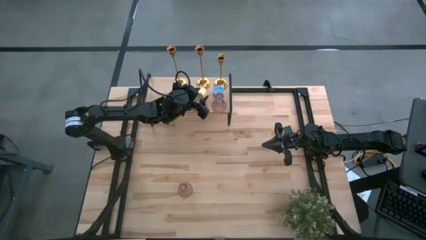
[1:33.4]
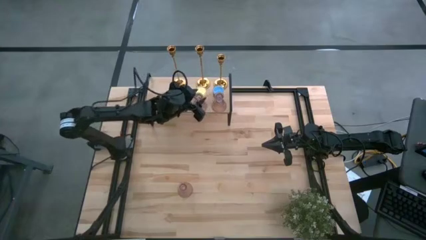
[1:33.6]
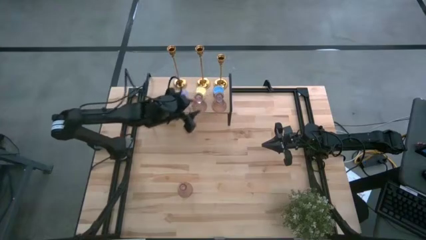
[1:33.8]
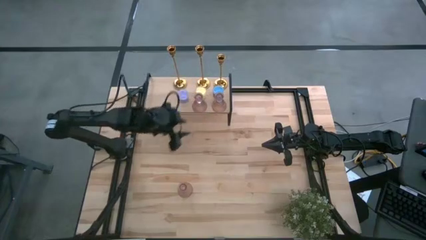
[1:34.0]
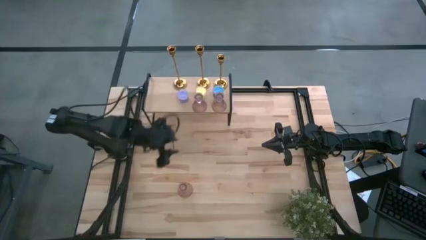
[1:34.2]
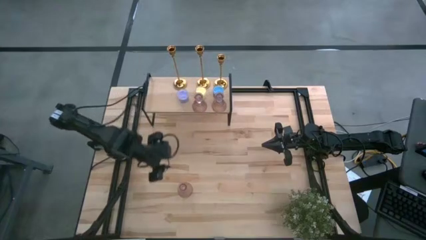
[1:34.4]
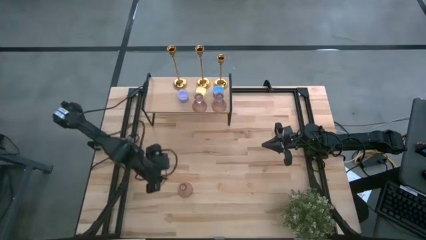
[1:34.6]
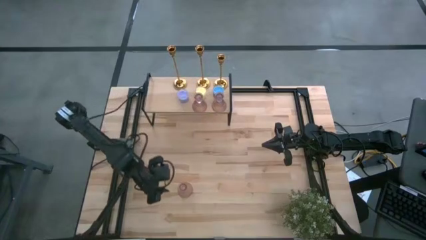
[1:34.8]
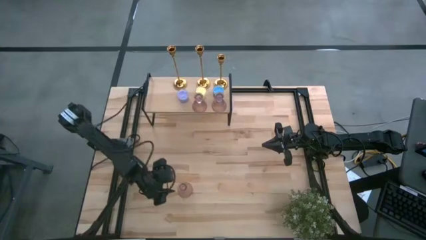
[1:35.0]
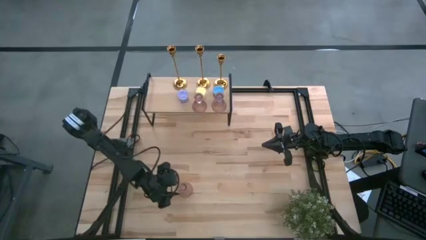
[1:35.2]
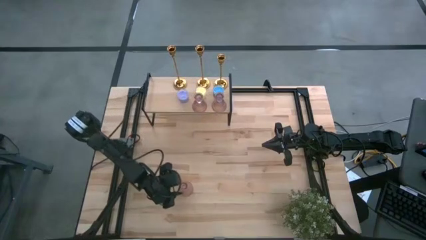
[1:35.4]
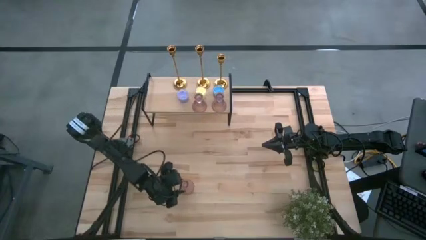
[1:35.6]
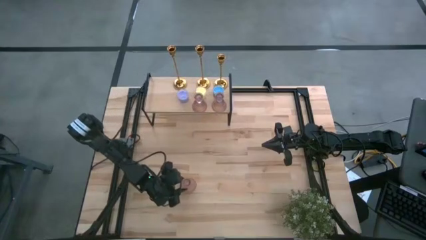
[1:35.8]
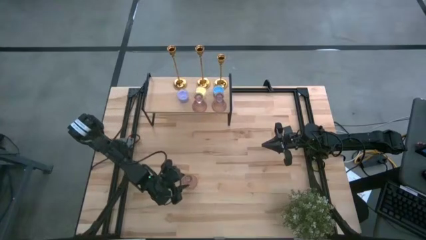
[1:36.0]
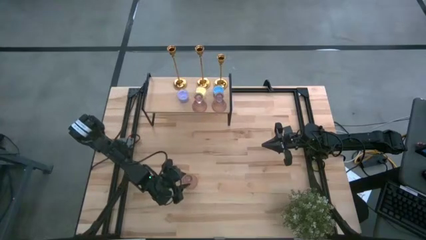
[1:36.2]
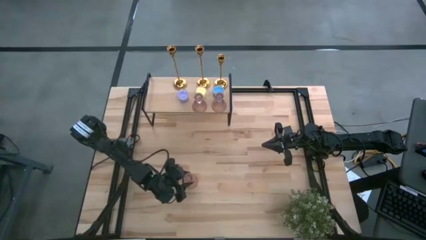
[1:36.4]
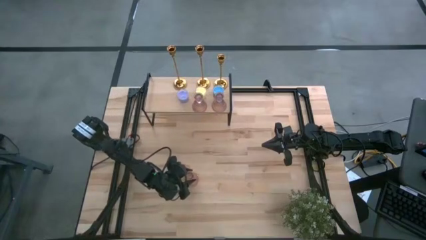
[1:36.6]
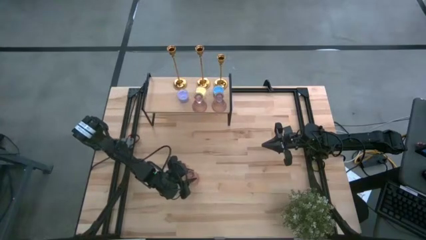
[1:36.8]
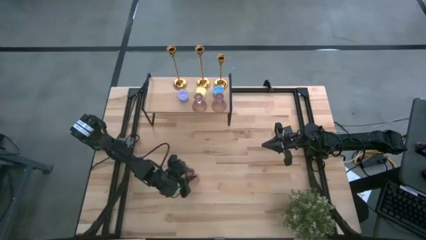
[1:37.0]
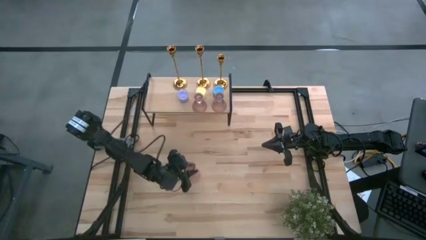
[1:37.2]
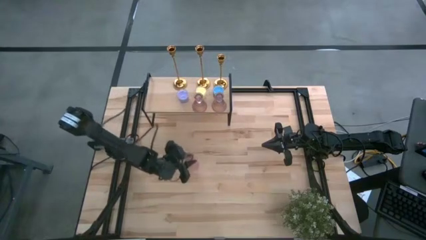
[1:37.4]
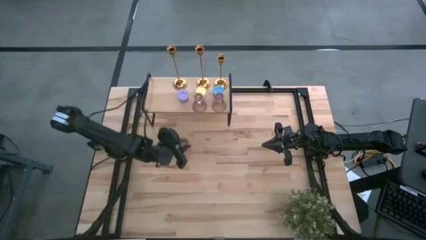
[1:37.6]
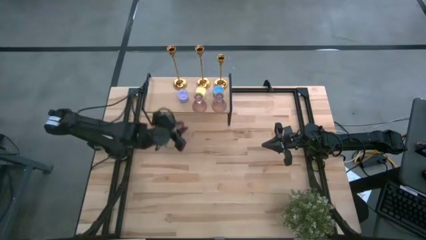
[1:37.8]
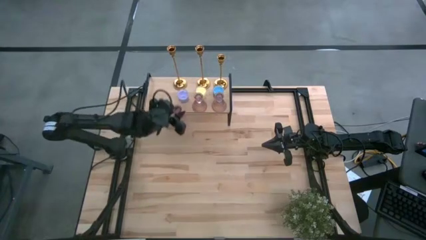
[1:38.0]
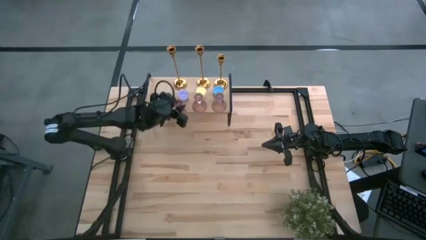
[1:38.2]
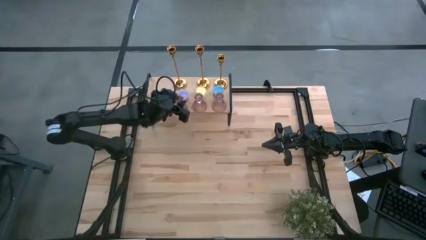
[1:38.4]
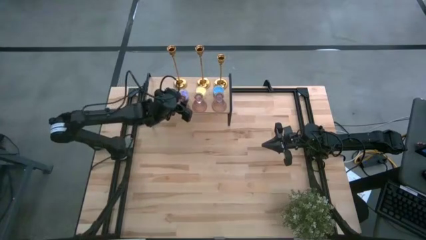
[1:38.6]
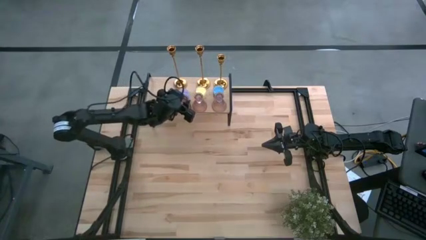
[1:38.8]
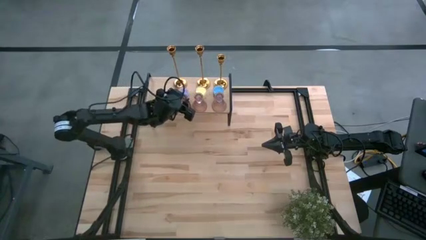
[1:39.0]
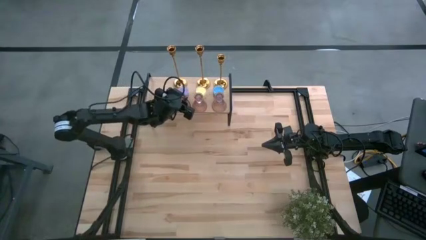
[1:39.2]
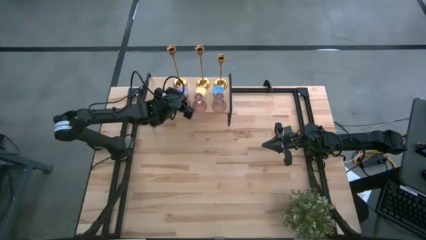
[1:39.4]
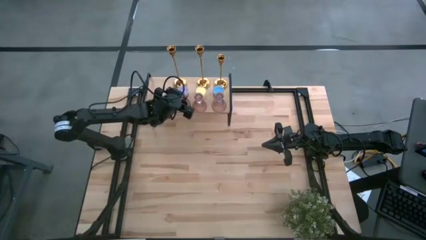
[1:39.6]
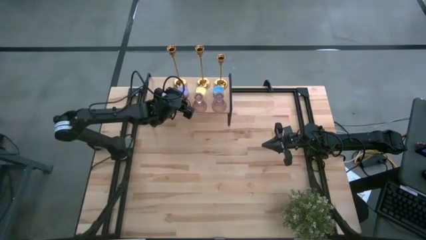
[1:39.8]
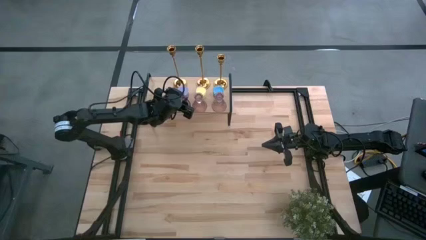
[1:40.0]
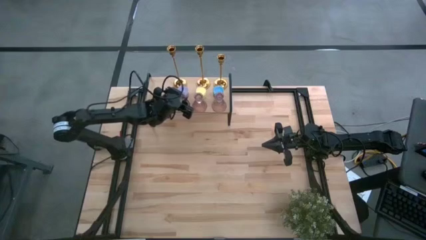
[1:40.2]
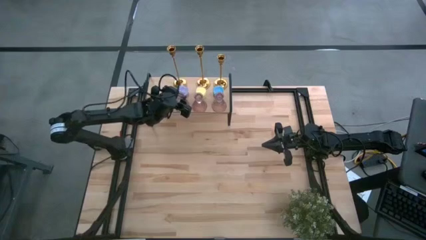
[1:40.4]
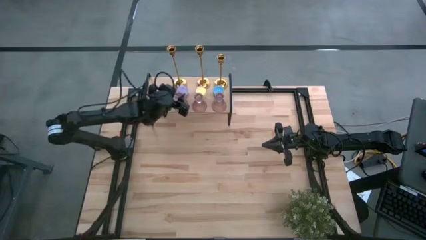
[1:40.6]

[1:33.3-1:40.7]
Task: Pick & Place candle stick holders
Put the pink candle holder on the shelf aligned with the pink candle holders

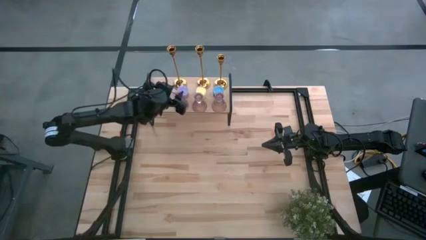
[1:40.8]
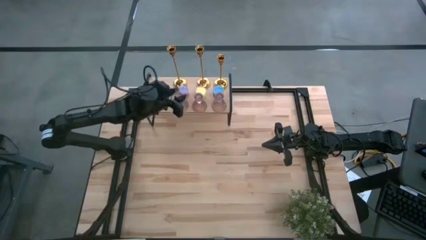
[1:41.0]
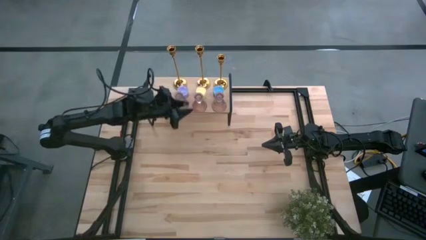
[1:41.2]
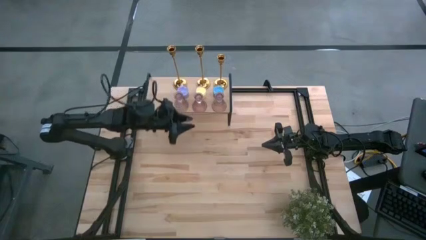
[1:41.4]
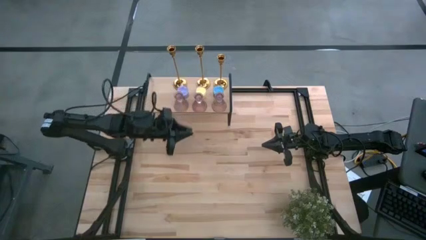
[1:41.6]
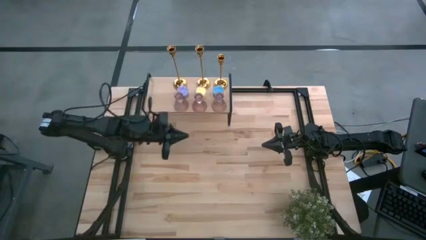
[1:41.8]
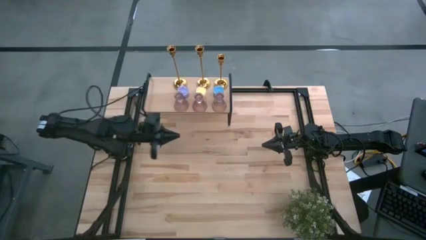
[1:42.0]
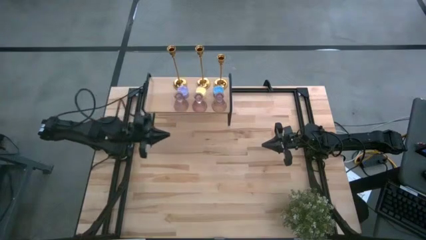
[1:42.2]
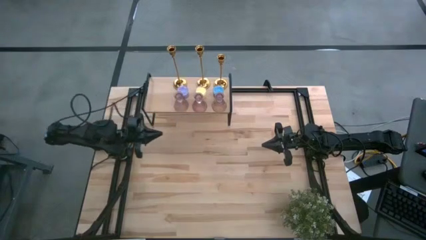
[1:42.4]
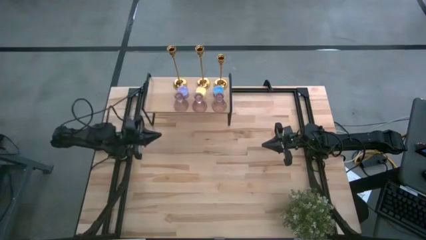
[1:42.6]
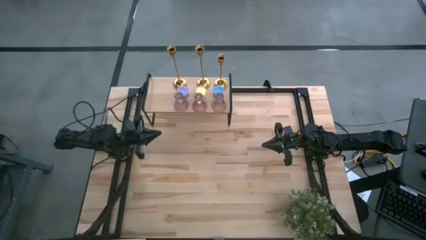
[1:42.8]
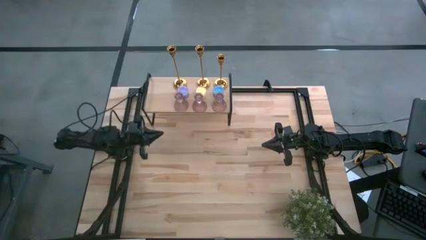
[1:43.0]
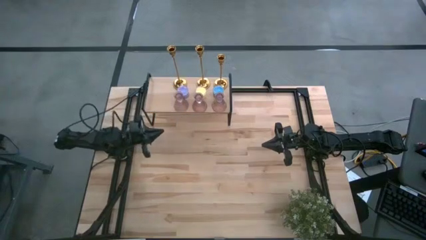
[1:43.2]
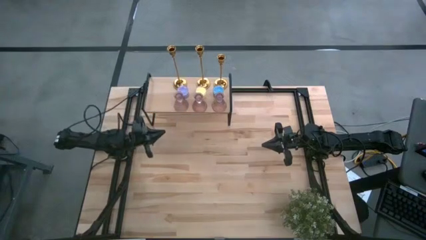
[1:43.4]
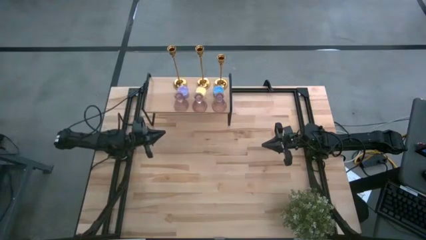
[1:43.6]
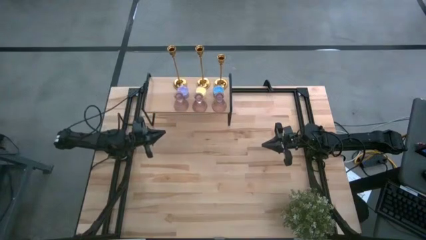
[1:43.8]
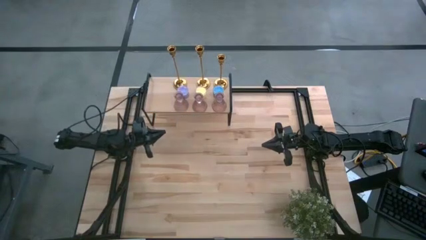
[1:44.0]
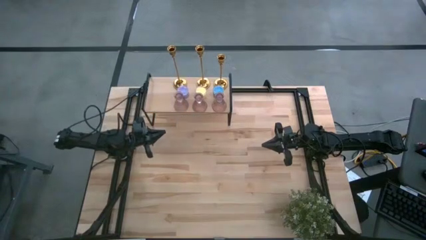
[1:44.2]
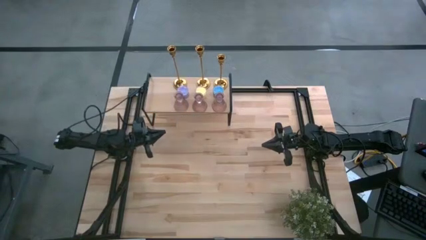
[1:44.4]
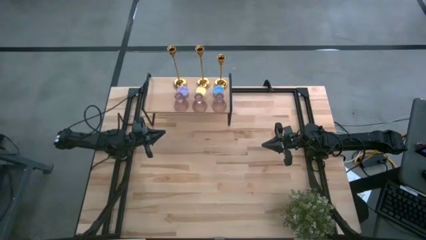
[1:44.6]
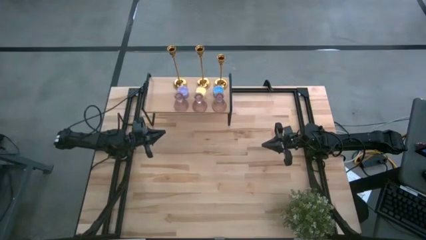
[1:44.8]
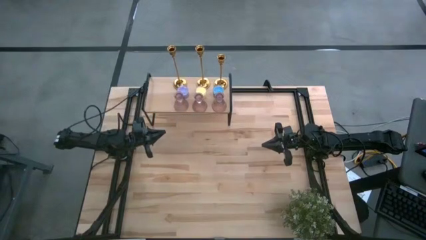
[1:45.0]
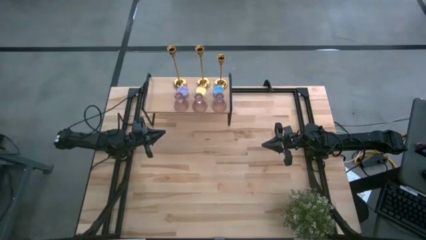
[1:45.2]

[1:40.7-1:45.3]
Return to Home Position

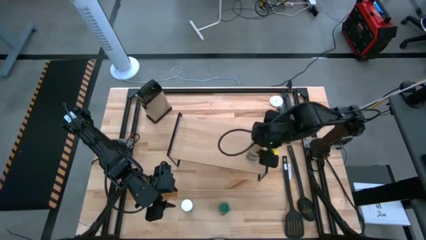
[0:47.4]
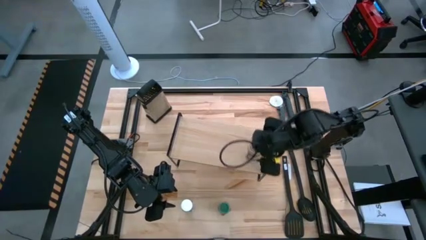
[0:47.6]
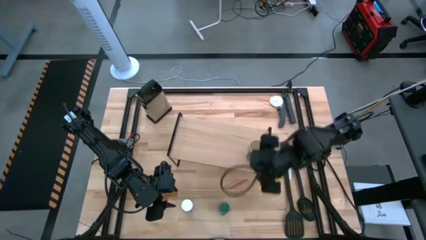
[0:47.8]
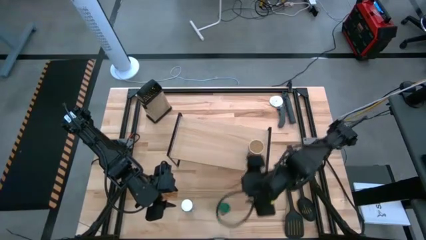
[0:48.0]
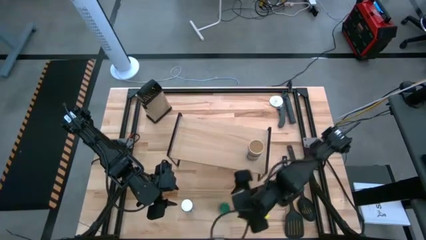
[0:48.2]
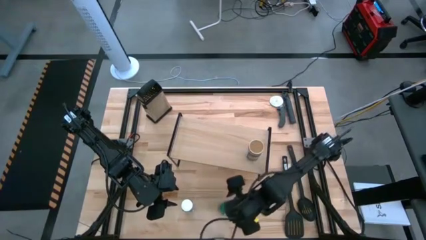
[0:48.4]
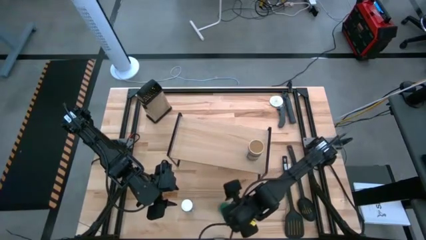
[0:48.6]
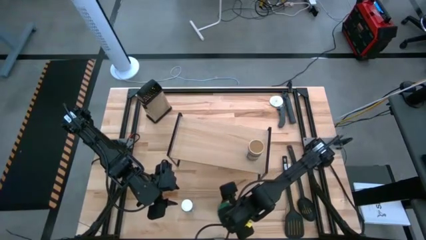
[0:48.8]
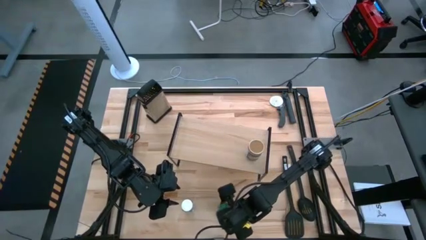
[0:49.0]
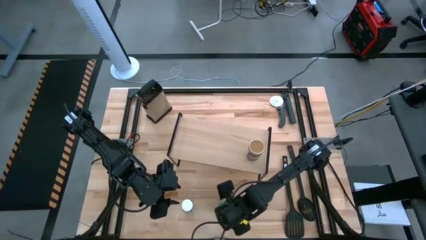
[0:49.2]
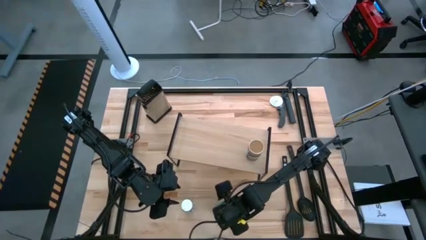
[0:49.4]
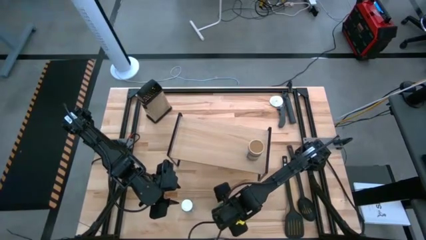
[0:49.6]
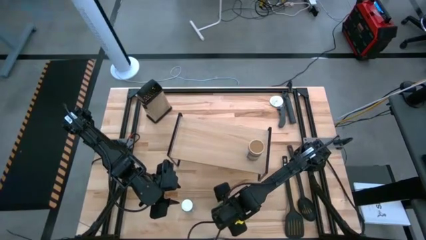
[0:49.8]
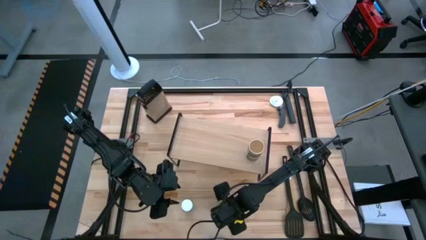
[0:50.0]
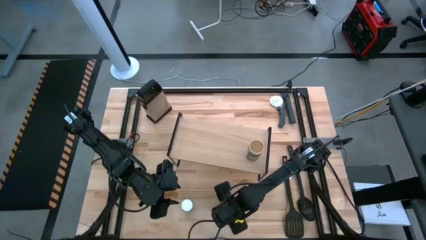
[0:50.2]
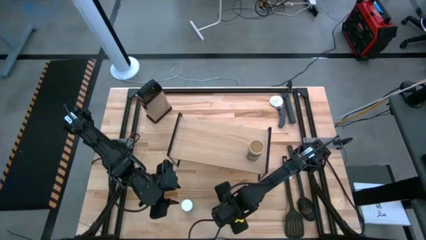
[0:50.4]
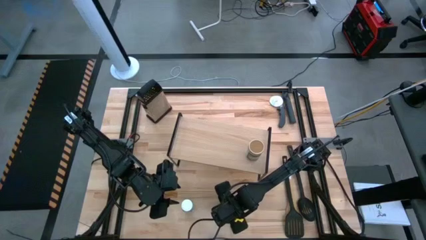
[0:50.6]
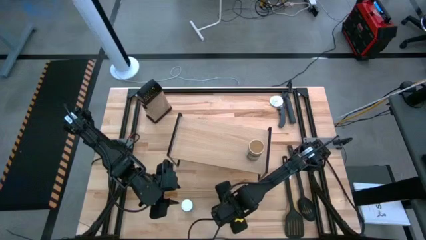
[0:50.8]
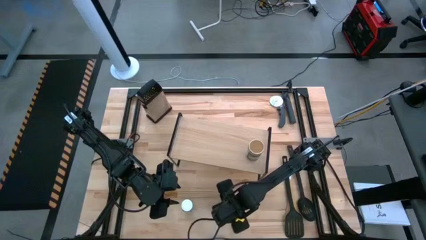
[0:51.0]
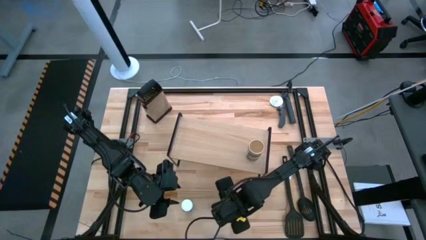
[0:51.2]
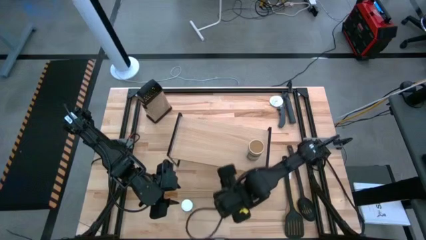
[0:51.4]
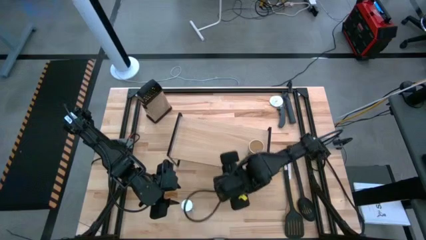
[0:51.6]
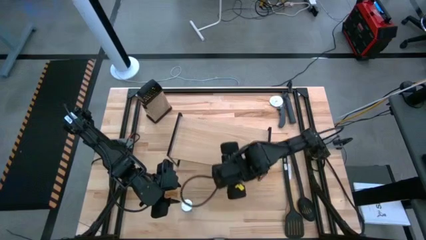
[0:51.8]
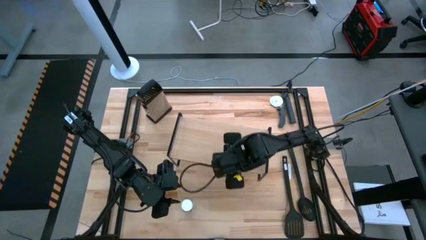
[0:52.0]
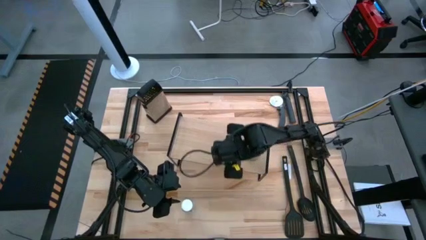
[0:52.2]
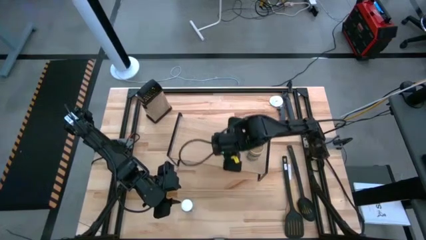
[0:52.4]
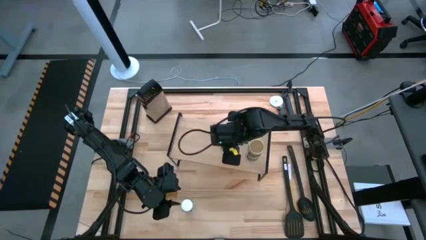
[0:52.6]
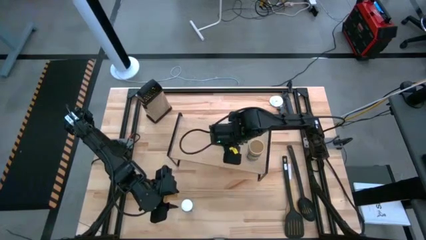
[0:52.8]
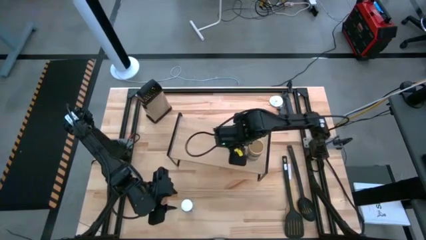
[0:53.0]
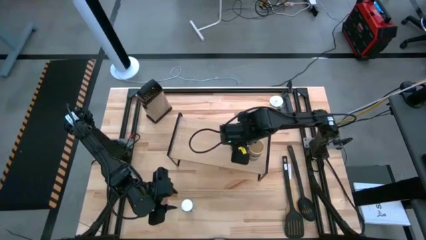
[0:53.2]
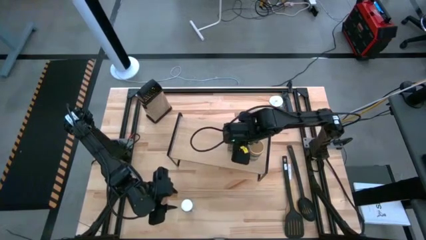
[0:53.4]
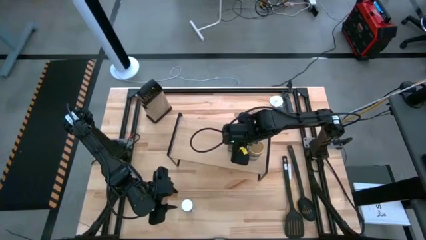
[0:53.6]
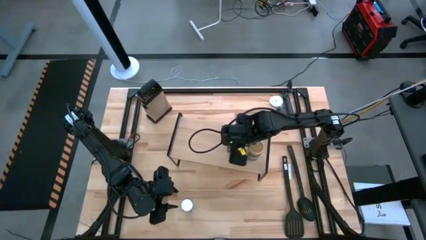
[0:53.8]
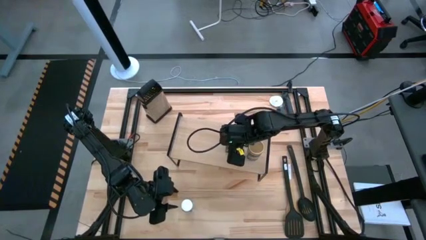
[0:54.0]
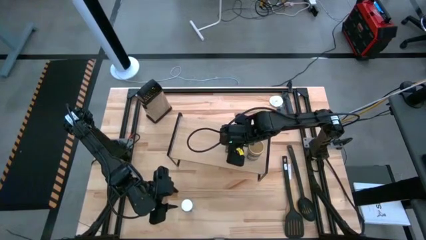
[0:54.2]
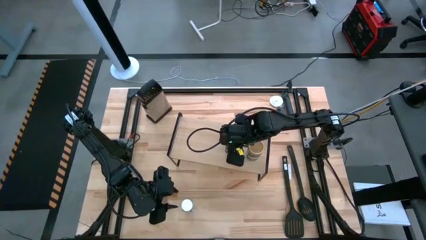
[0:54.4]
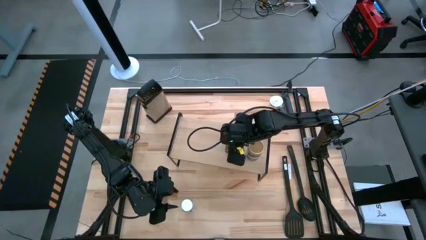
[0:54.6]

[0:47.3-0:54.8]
Task: Shelf spices
Put the green seasoning bottle on the shelf
